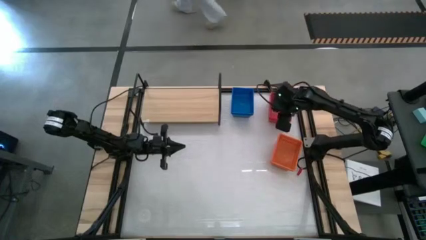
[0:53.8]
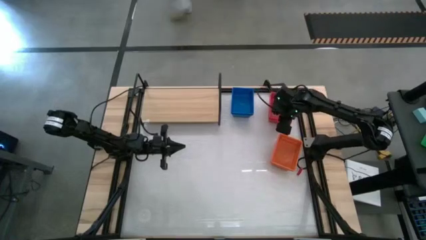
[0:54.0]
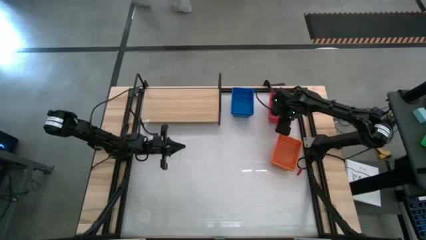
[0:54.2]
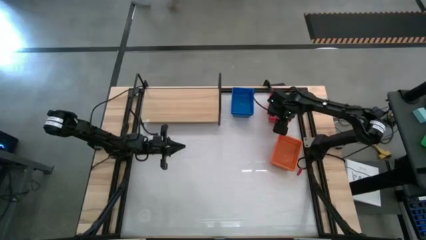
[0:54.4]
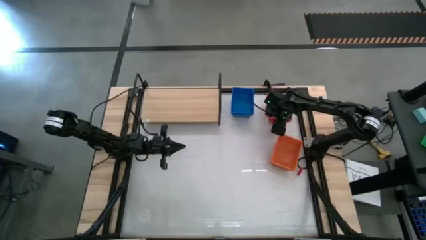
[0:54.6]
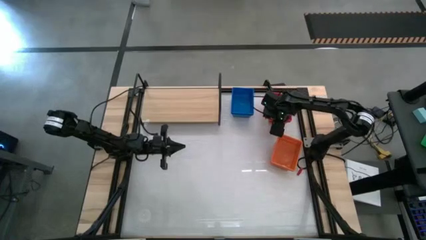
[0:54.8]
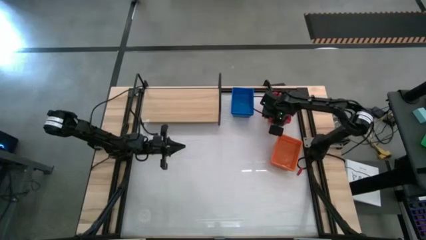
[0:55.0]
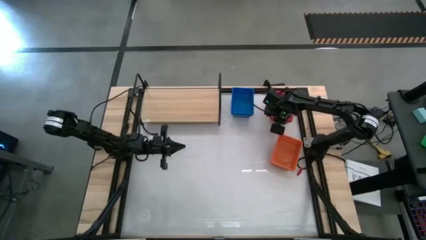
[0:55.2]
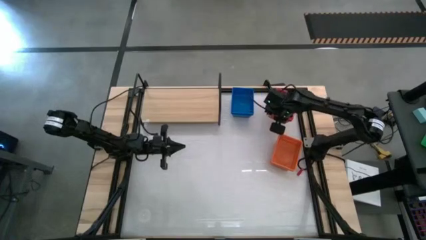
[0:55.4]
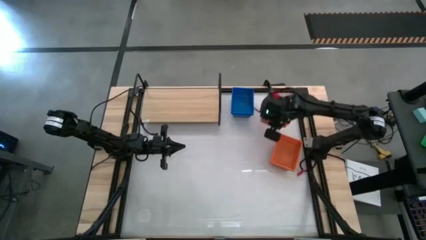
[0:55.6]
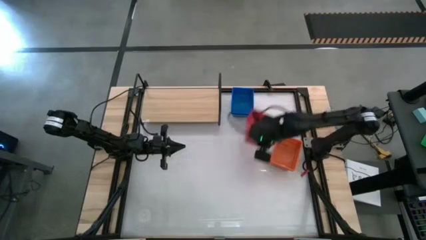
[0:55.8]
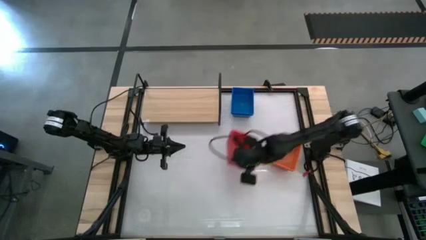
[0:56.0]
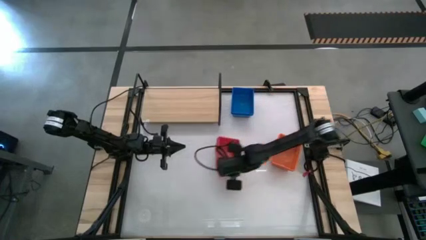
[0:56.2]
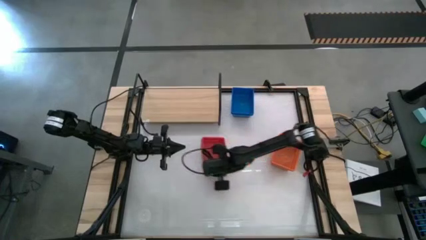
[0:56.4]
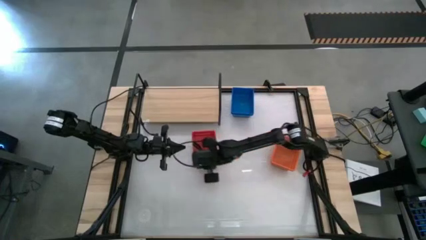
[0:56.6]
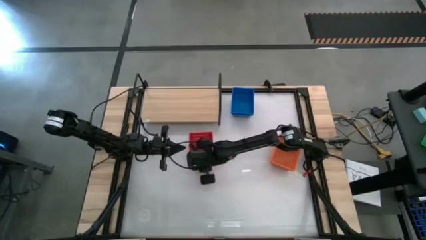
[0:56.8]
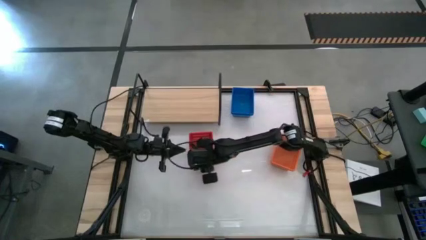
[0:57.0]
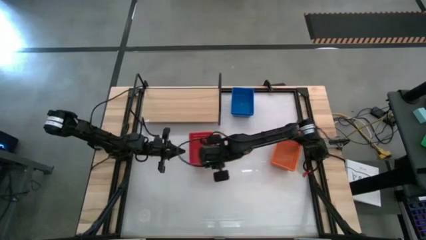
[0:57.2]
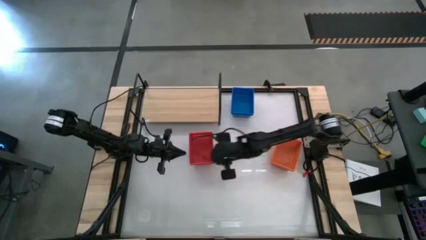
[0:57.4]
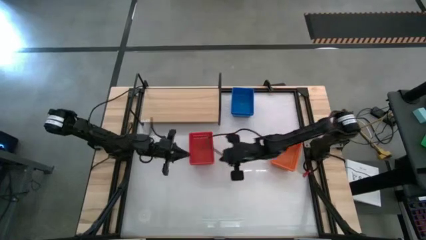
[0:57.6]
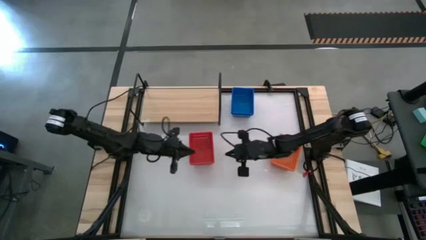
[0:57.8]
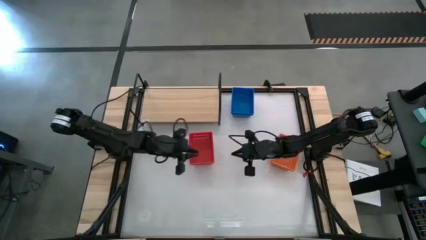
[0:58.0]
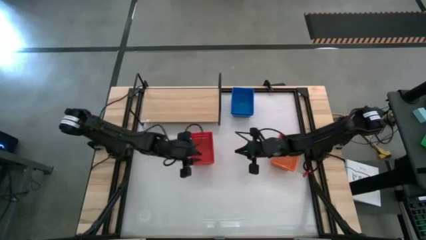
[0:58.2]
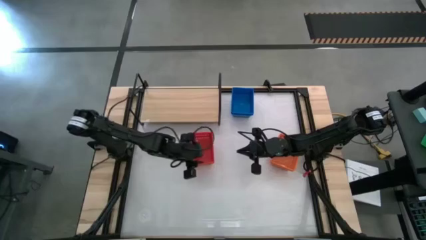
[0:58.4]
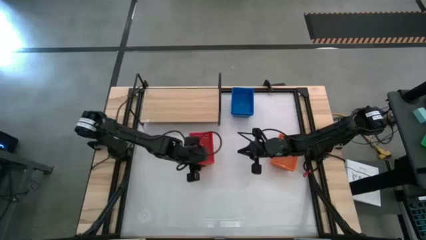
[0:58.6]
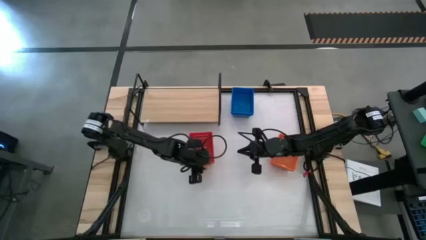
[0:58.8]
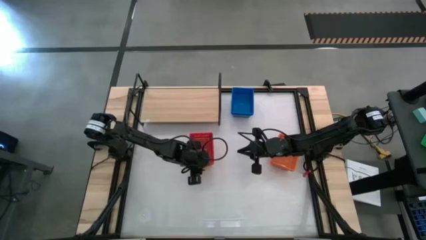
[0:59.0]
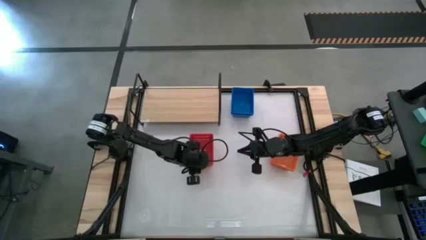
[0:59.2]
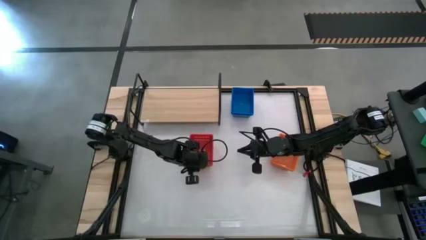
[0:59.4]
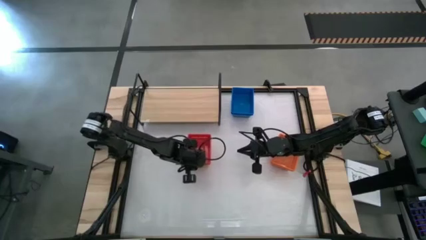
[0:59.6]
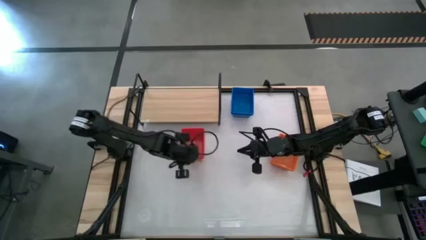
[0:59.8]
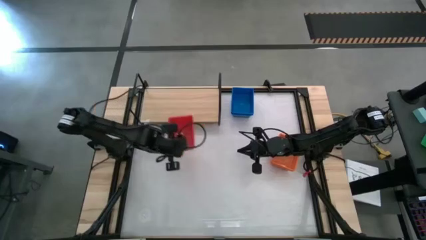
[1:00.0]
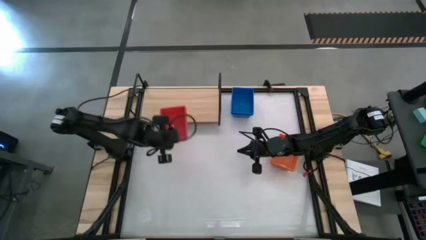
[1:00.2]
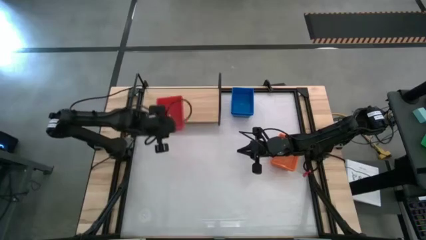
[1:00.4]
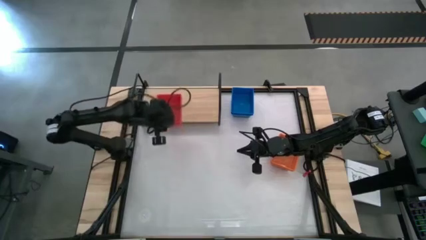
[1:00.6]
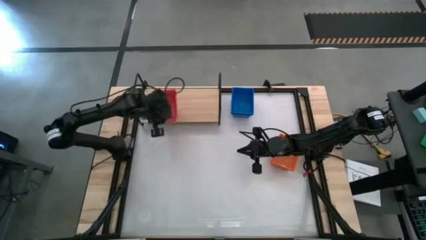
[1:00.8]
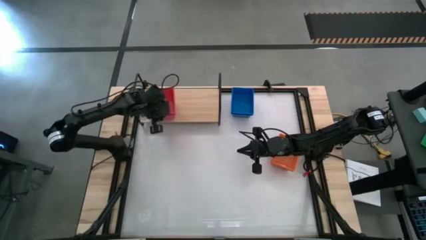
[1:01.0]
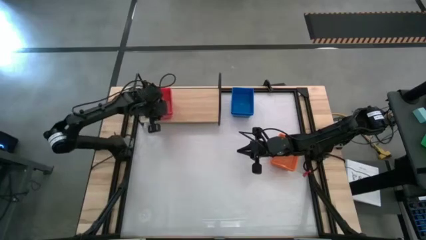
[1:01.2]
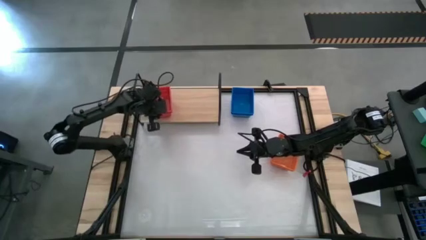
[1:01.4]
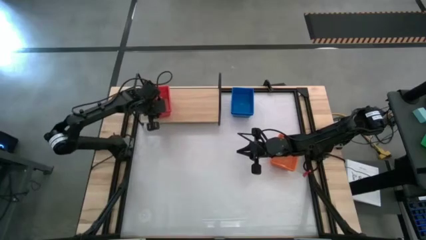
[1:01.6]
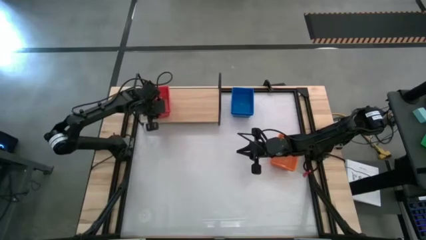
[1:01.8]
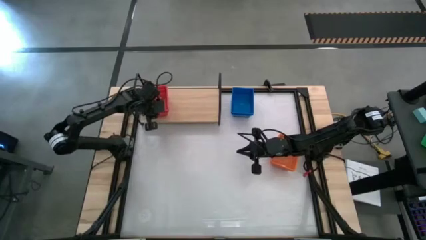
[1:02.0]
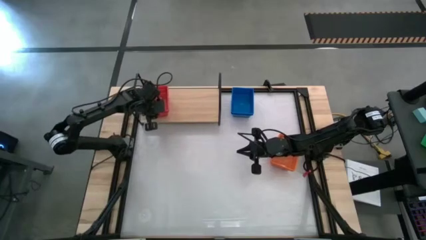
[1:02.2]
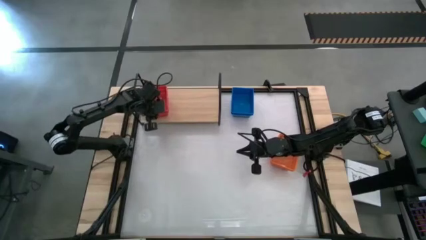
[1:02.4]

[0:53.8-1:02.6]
Task: Stack baskets on shelf by color
Put the stacked red bins on the shelf

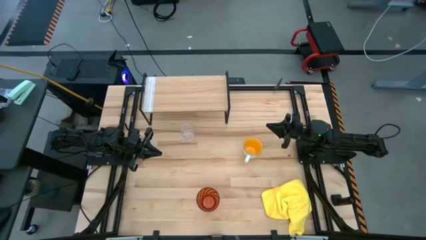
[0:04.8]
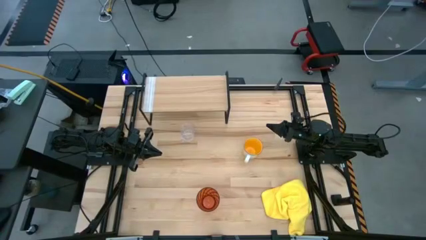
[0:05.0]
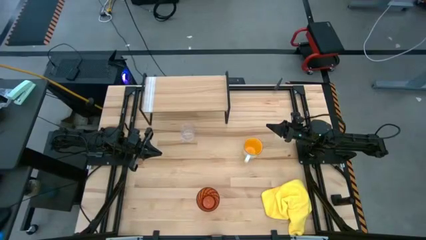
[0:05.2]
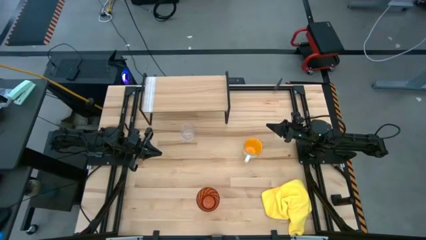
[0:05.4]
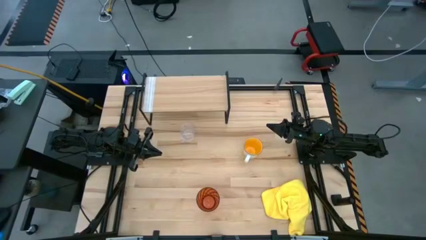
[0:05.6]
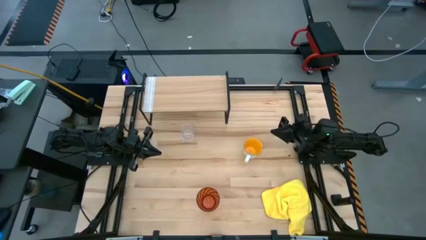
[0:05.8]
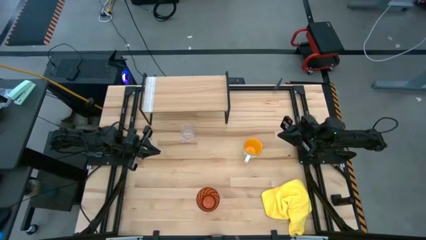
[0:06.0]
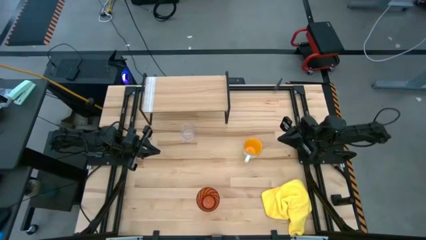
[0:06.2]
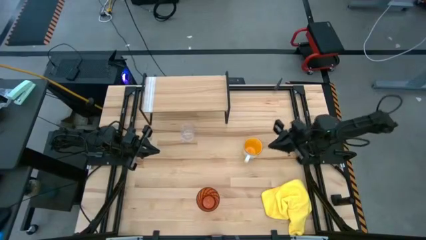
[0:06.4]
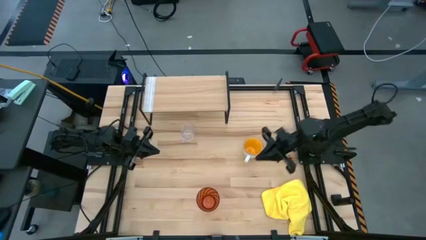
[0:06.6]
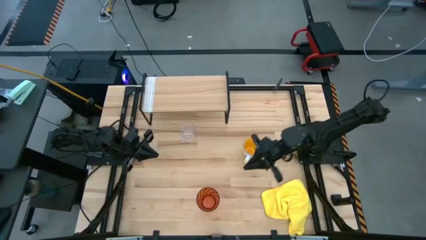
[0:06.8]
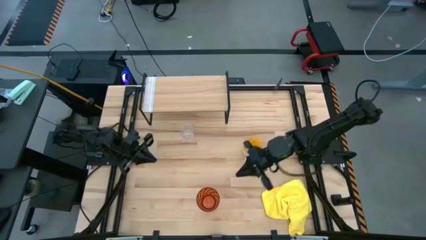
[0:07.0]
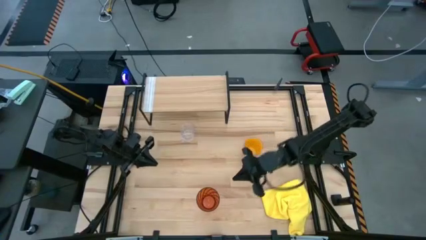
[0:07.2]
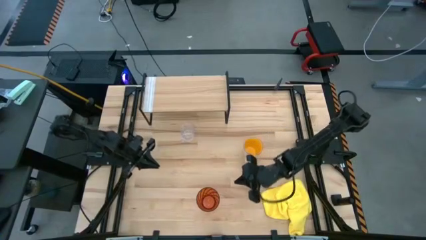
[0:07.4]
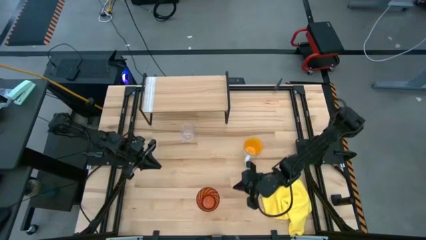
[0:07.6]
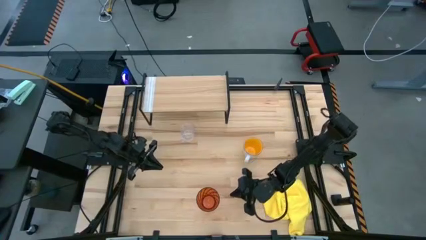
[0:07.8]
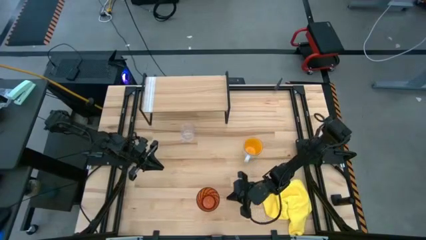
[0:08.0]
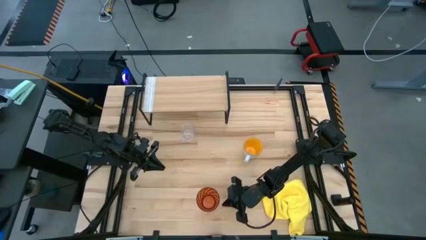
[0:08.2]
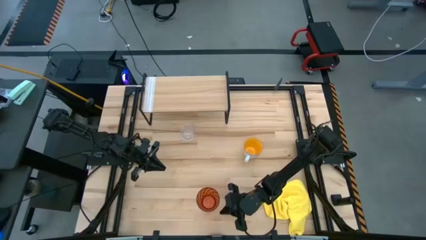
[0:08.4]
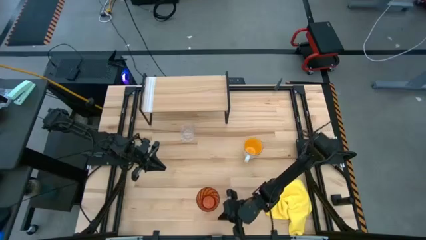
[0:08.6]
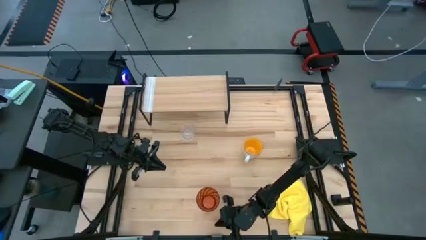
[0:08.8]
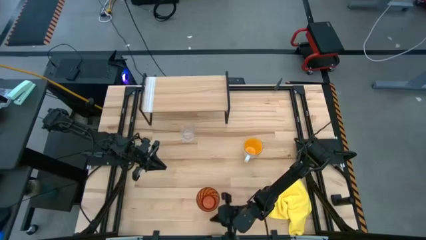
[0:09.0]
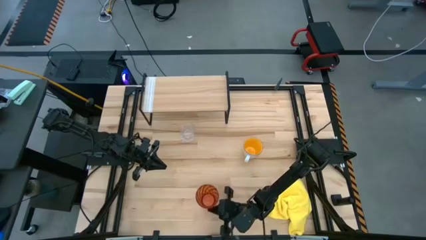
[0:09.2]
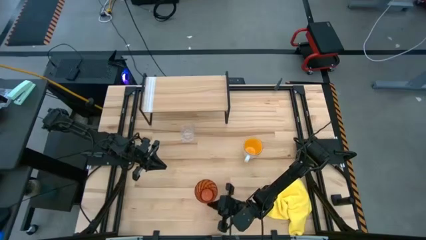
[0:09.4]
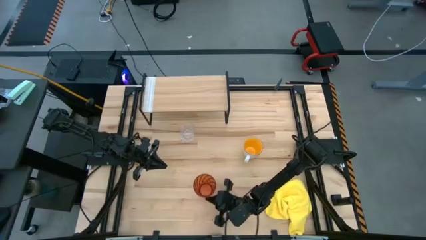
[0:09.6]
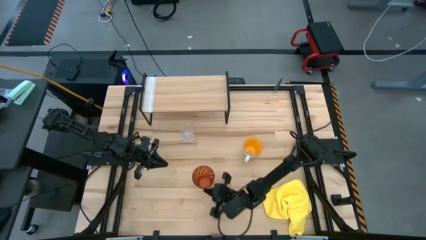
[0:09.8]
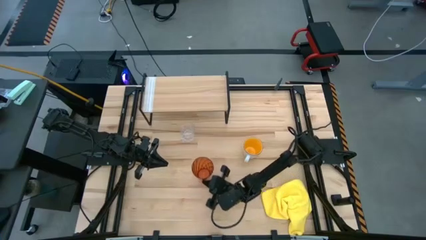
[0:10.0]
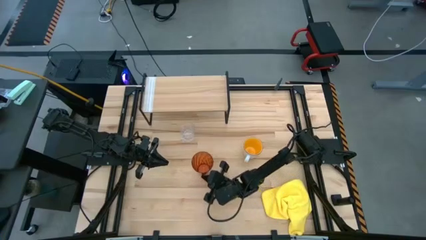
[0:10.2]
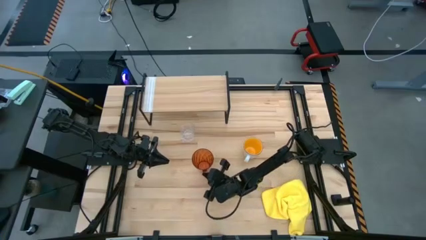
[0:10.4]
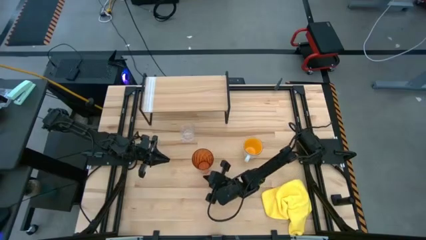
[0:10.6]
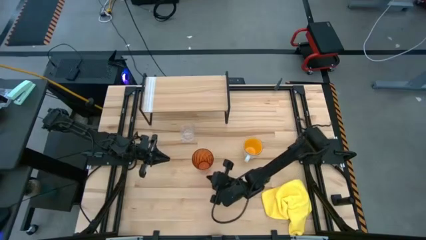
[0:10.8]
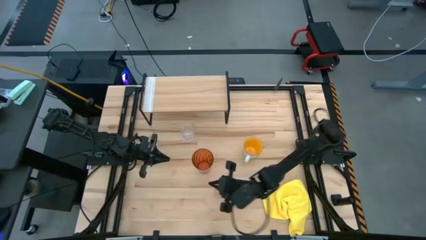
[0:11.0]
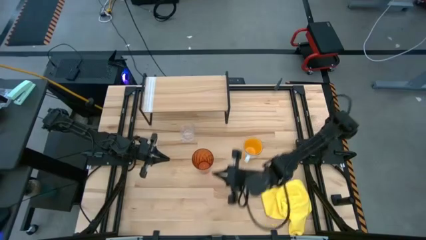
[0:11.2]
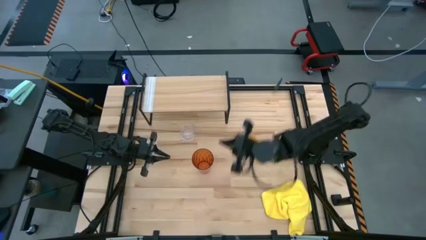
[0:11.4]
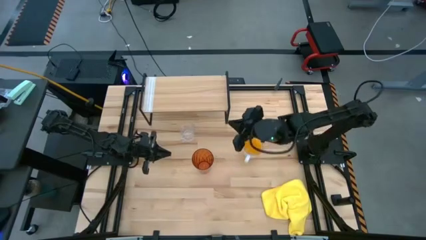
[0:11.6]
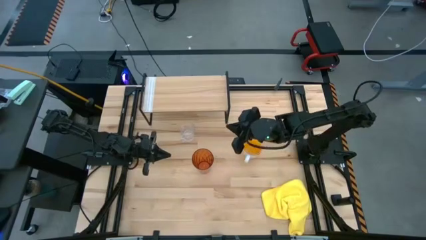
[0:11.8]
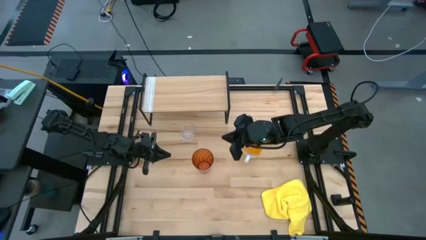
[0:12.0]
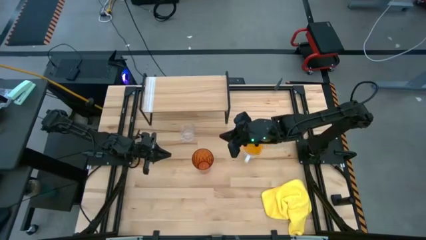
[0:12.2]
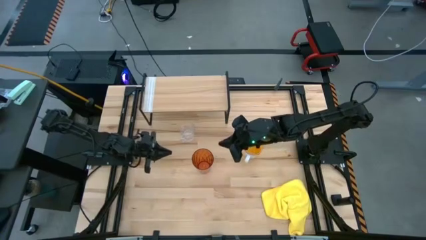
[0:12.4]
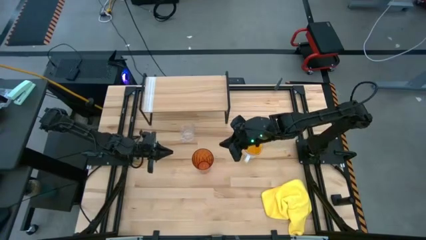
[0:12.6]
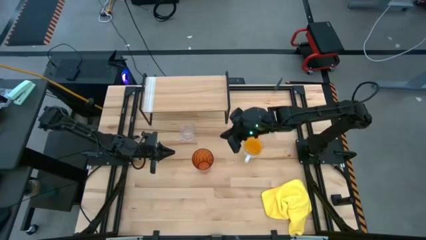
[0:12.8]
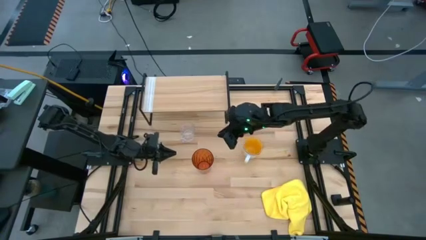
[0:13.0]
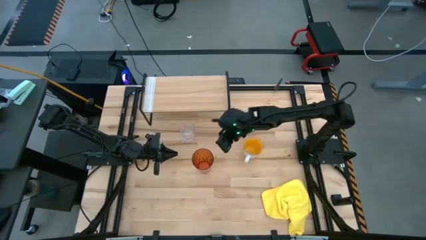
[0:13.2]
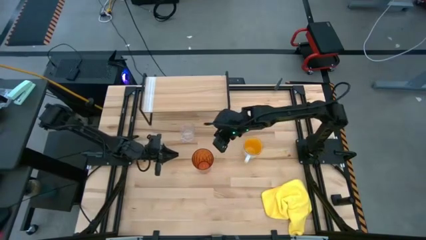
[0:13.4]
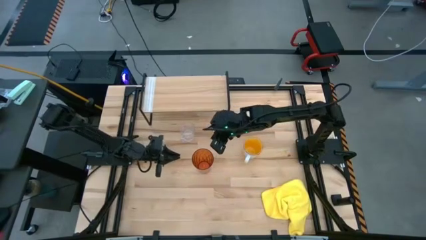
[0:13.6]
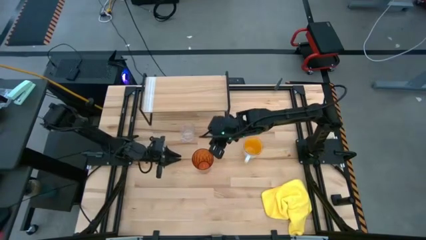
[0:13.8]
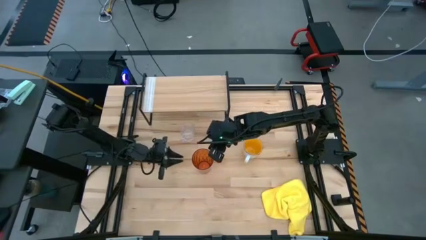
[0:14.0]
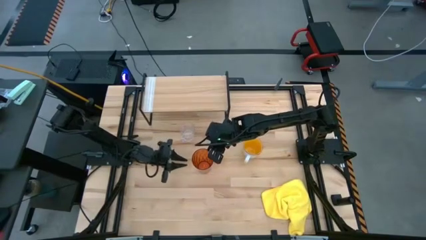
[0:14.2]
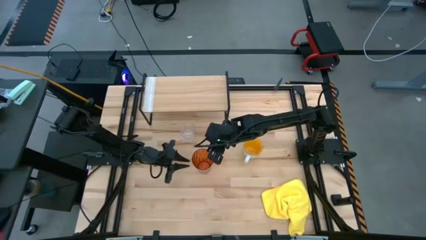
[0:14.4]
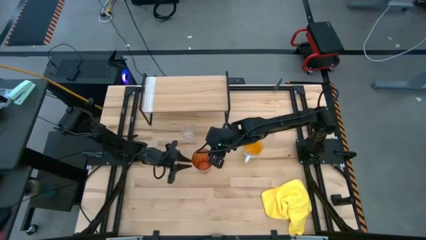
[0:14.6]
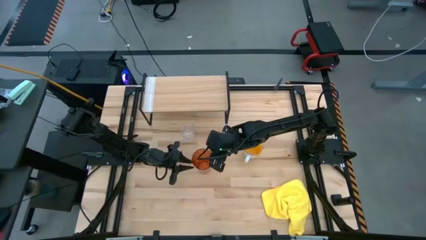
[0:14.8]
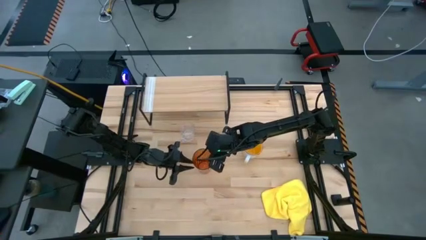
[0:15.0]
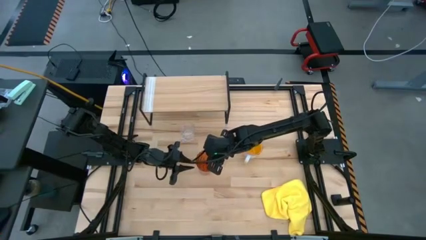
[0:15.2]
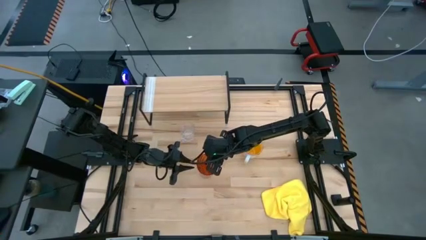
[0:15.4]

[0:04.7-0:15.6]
Task: Stack small to large cups/mugs on shelf
Put the orange glass on the shelf
